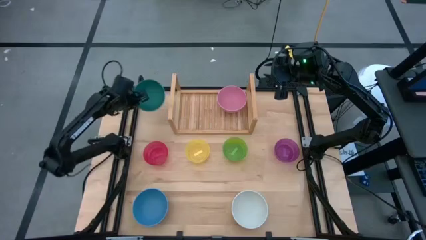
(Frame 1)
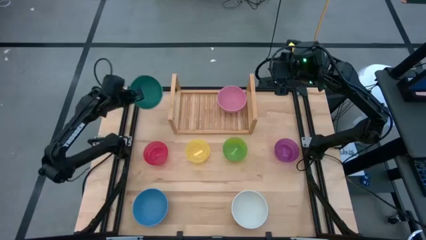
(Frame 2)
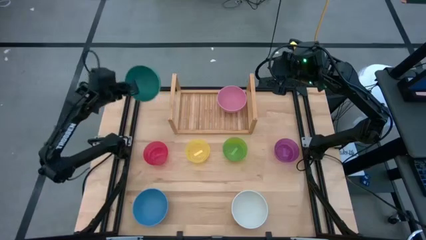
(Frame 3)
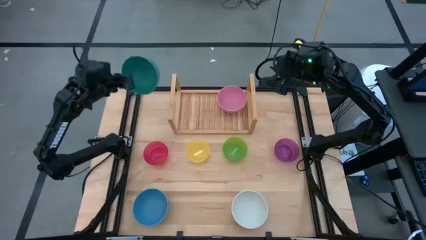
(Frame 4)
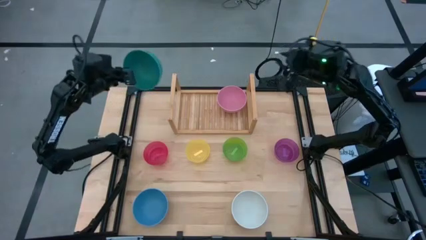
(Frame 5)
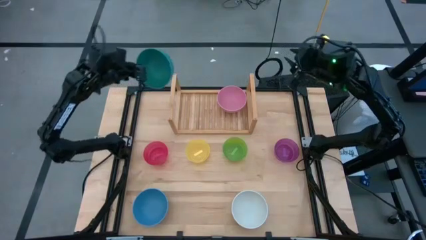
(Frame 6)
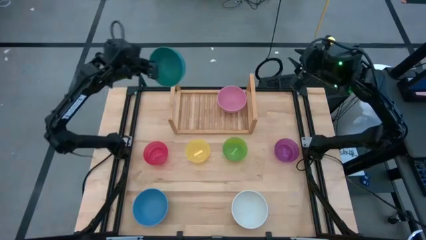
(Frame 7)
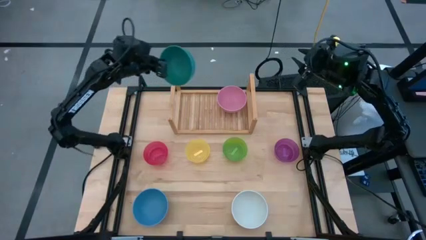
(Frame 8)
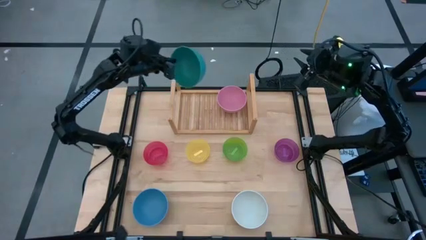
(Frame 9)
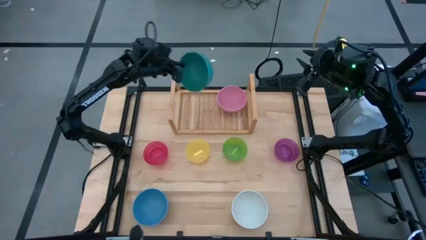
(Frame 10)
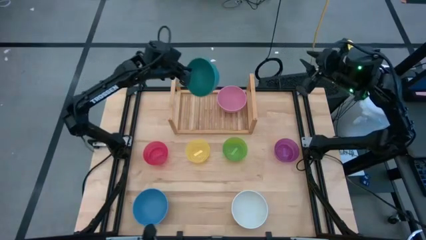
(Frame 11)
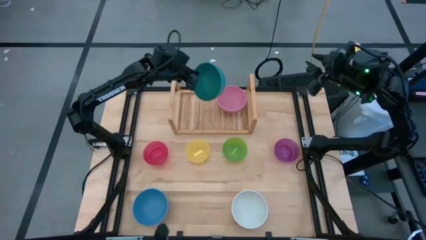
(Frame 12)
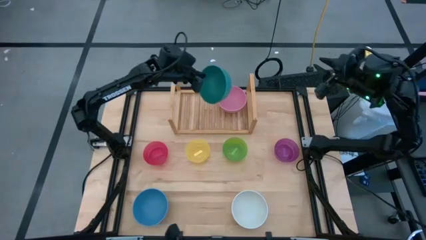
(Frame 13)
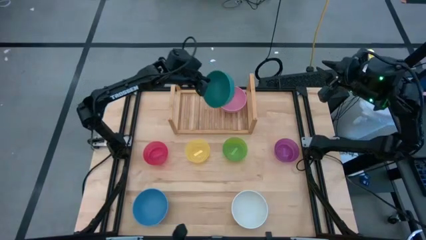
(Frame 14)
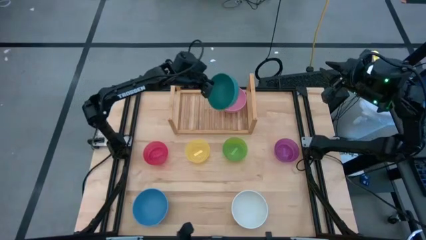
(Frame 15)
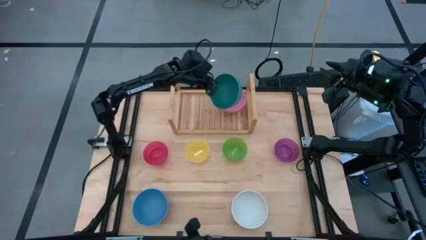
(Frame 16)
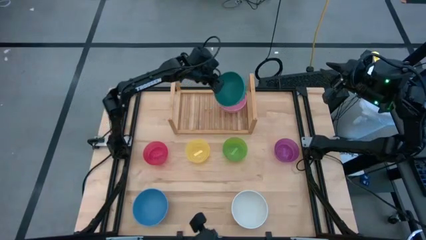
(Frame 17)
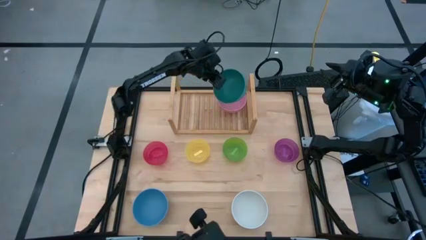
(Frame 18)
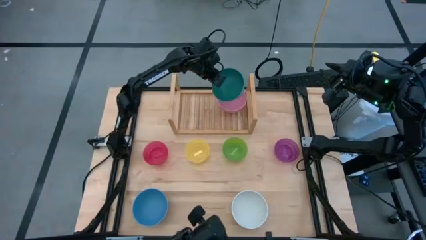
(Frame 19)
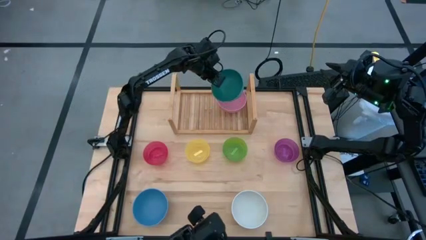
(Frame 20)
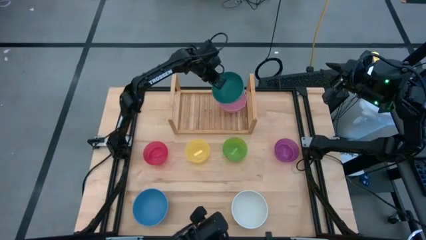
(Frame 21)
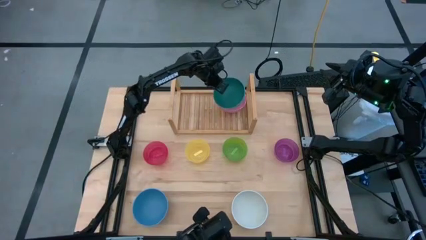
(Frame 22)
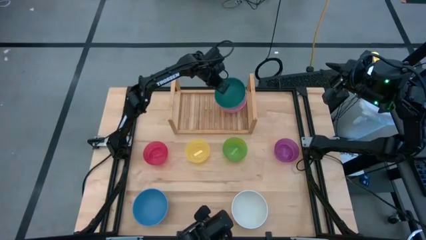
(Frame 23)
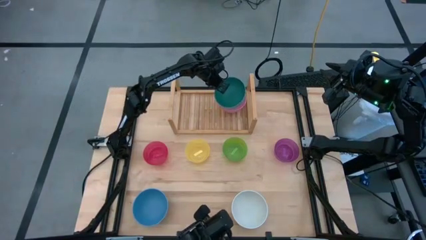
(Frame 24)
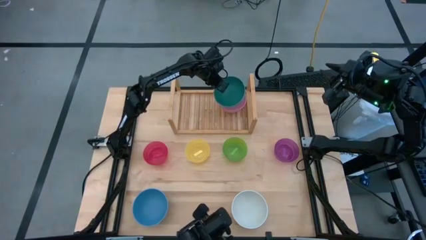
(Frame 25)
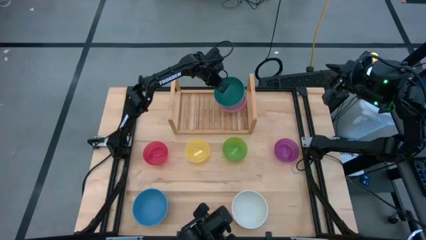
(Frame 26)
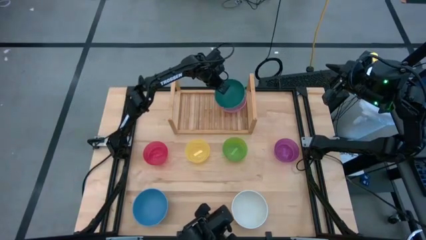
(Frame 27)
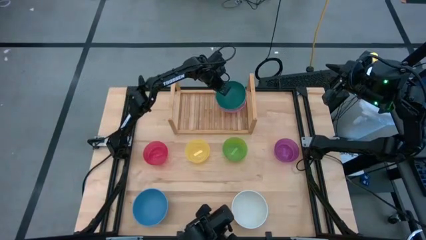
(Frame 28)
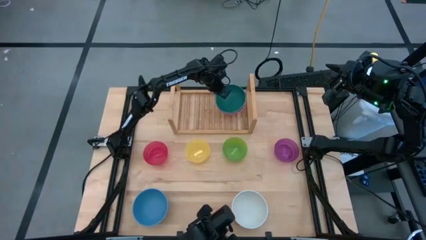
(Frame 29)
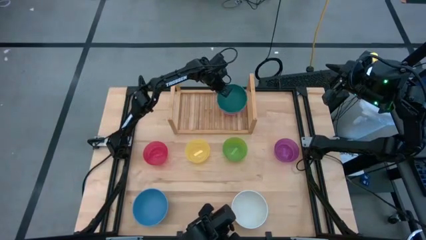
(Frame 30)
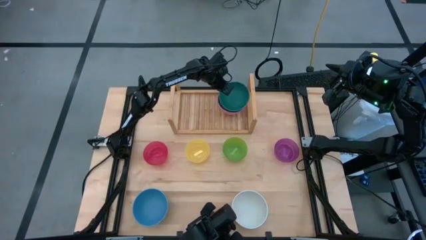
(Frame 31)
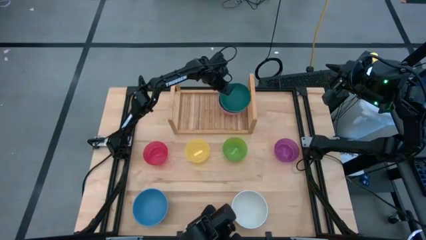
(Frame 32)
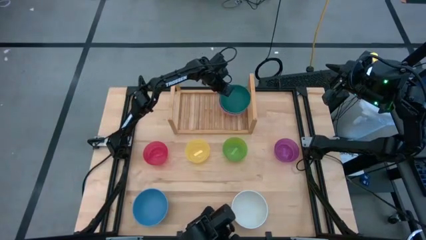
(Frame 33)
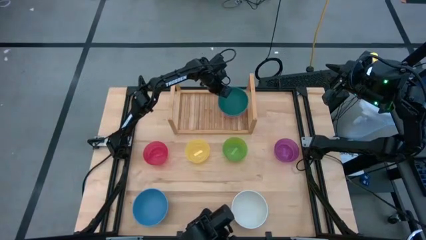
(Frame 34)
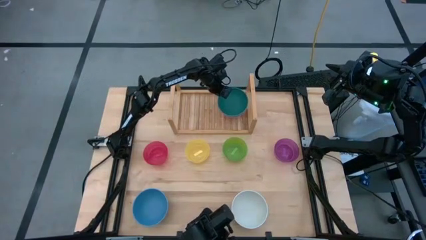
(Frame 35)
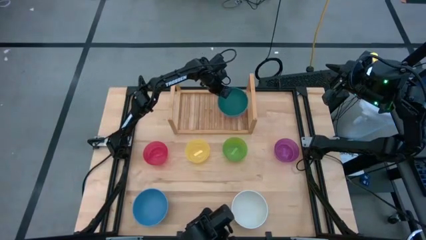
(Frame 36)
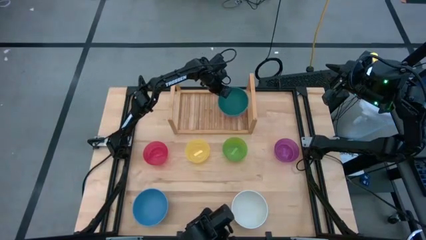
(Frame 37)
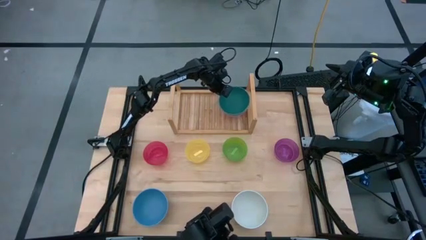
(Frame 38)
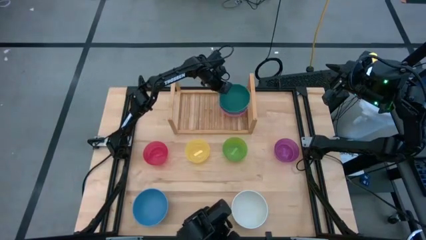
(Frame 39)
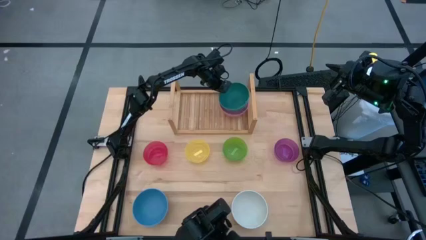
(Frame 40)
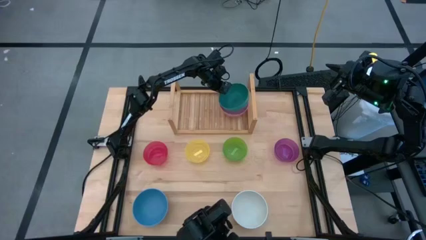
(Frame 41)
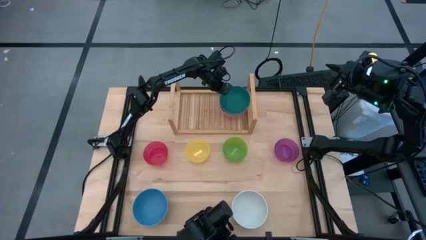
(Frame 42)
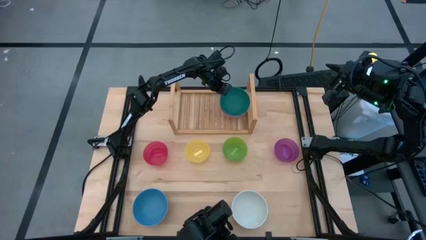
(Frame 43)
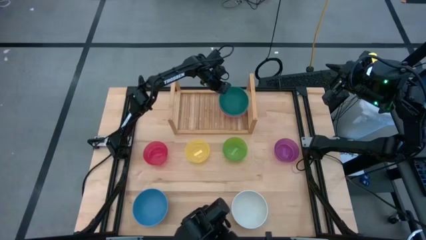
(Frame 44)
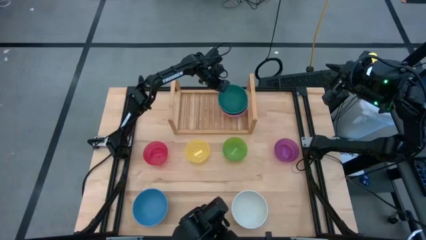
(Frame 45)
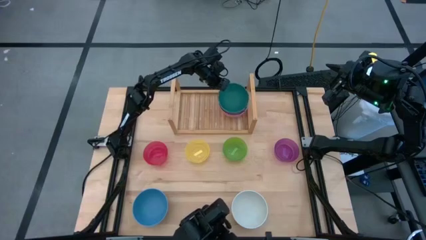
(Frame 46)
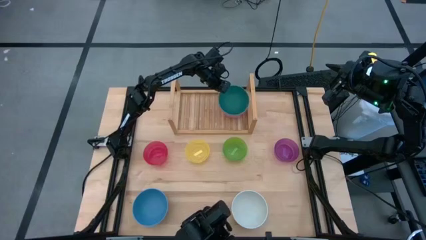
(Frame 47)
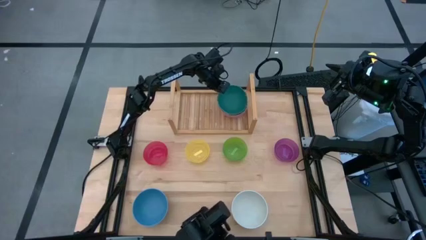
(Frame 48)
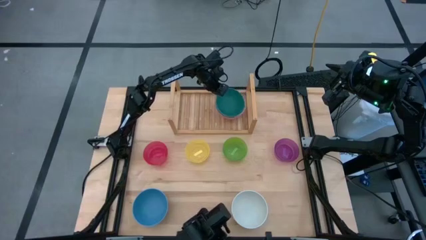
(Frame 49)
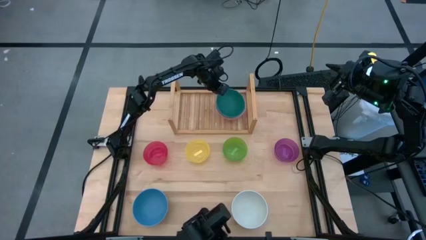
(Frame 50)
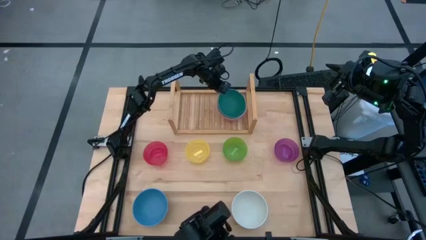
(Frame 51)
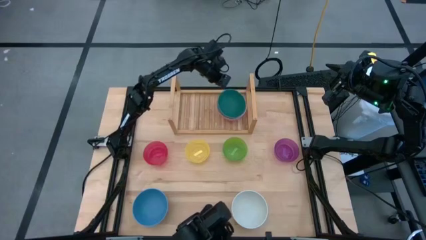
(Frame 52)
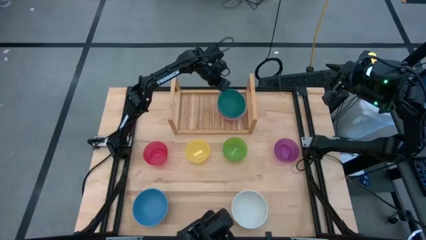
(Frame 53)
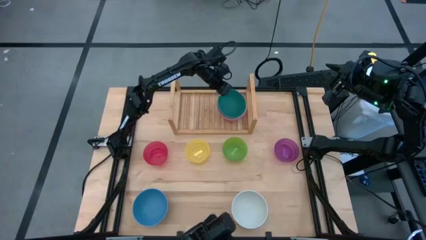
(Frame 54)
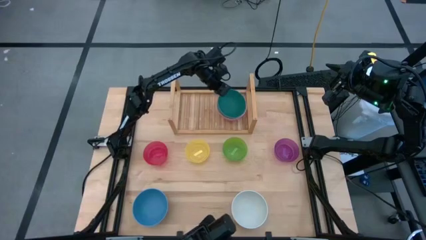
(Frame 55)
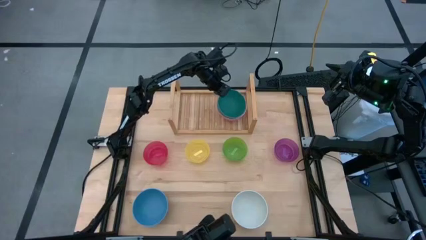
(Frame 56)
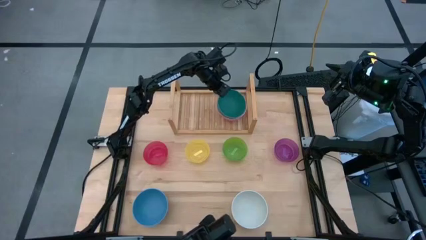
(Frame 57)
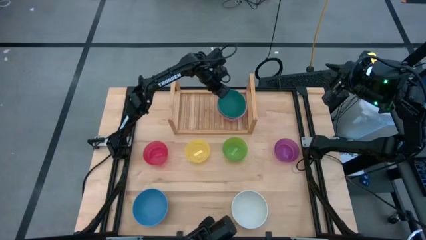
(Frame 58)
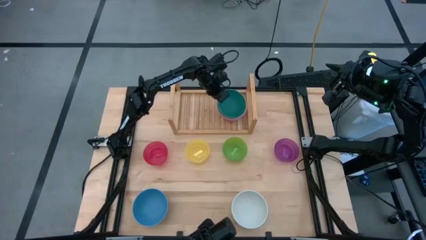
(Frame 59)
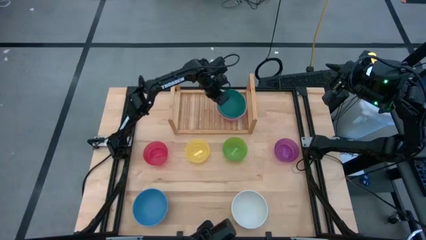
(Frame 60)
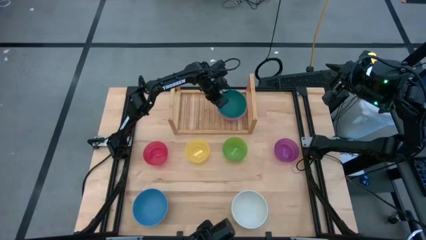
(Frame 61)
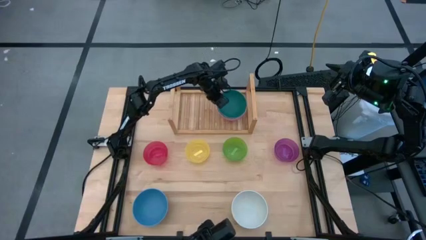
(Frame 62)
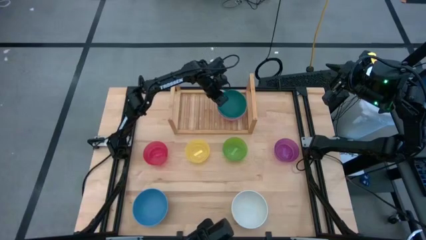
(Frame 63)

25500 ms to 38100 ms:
Task: Place and stack bowls onto a shelf
Stack the dark green bowl into the pink bowl on the shelf
